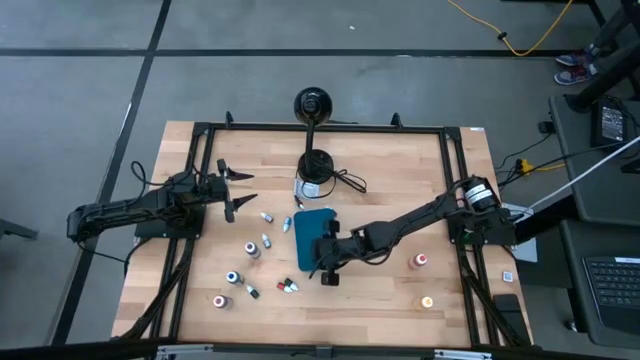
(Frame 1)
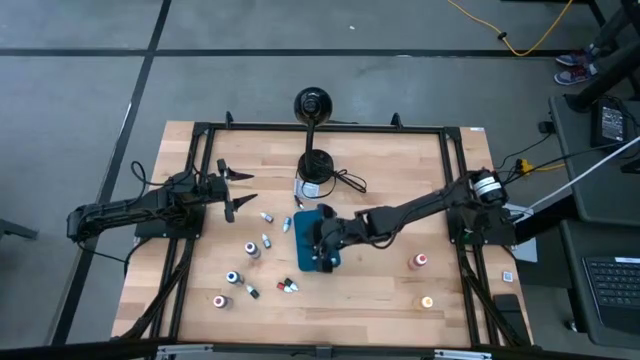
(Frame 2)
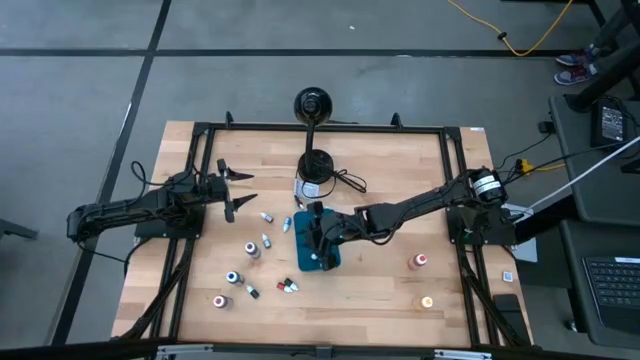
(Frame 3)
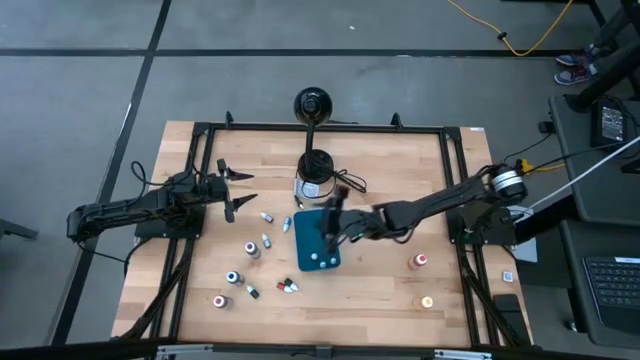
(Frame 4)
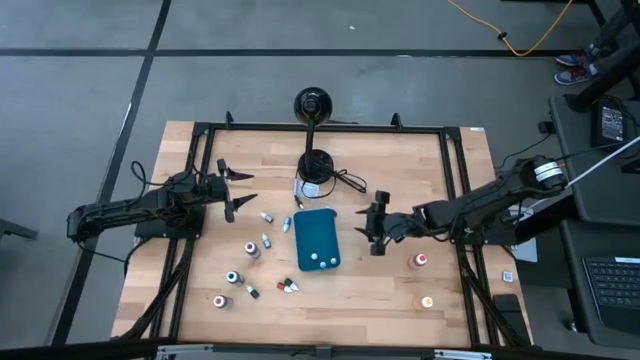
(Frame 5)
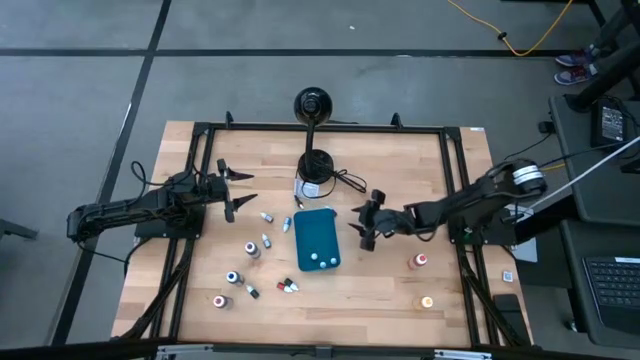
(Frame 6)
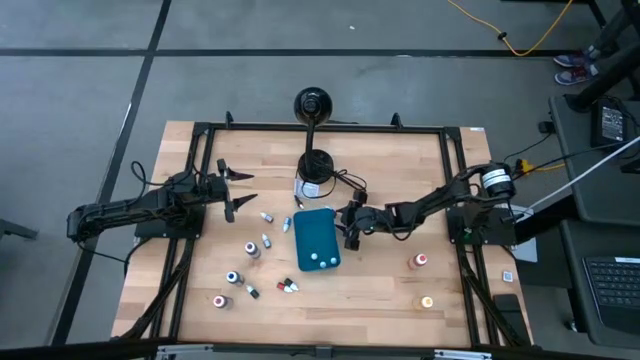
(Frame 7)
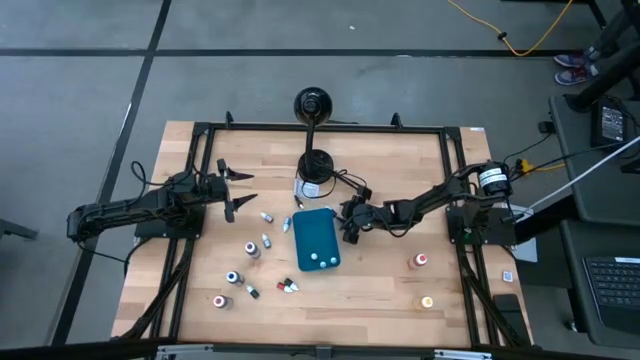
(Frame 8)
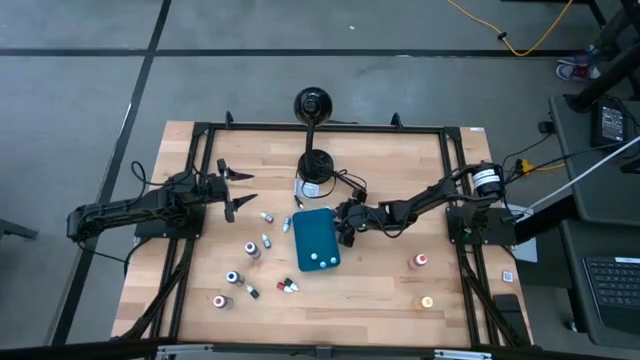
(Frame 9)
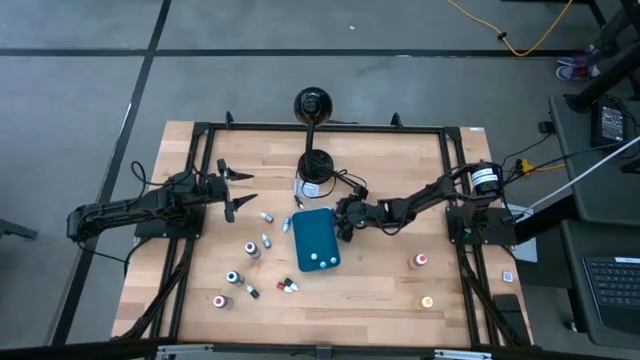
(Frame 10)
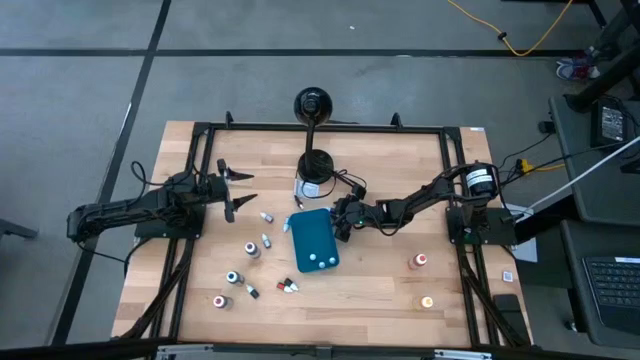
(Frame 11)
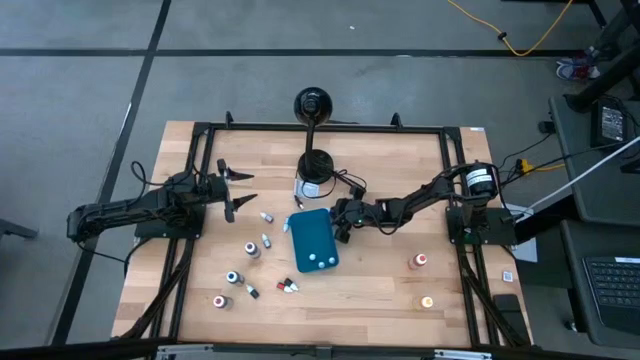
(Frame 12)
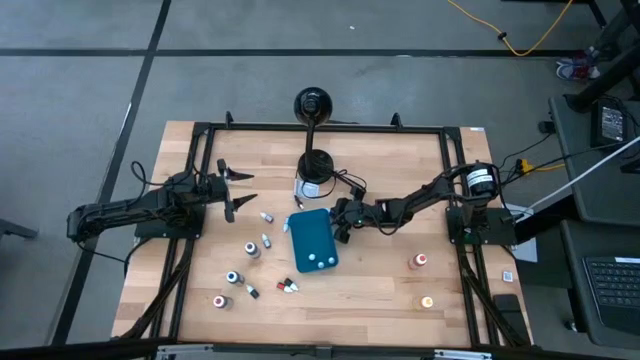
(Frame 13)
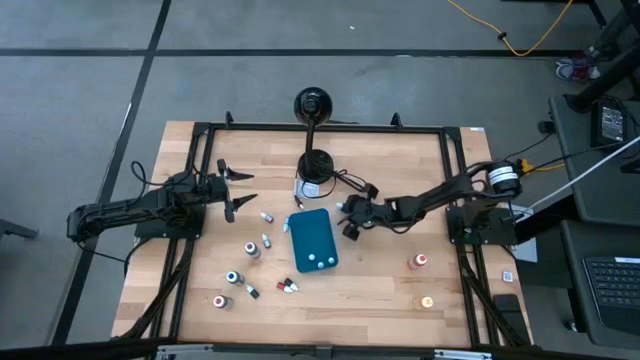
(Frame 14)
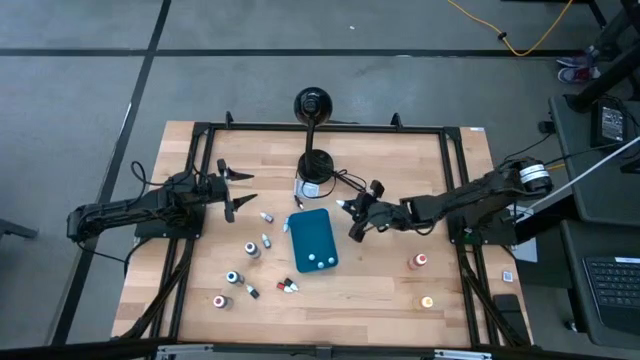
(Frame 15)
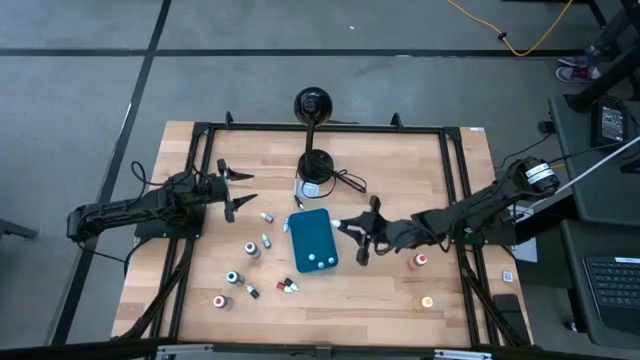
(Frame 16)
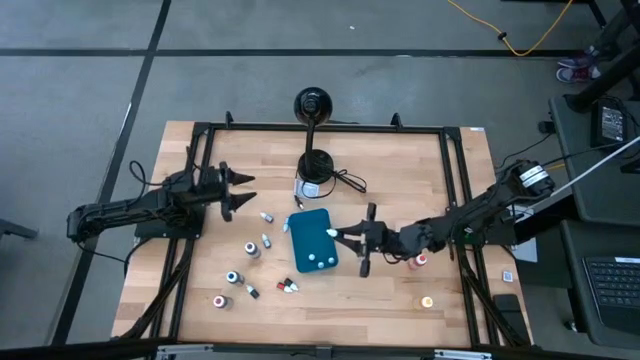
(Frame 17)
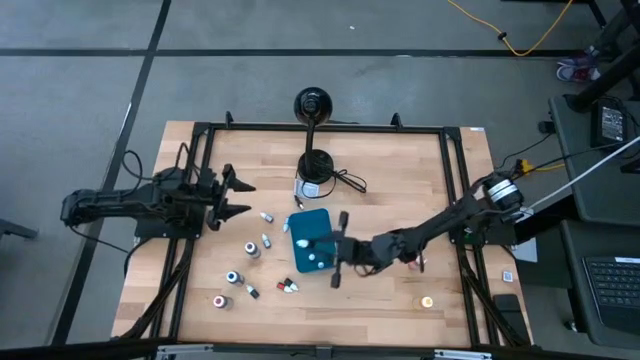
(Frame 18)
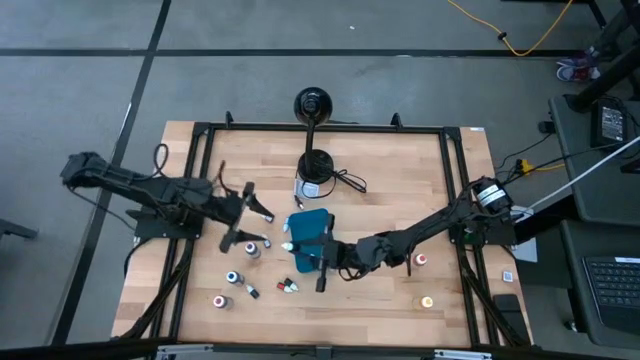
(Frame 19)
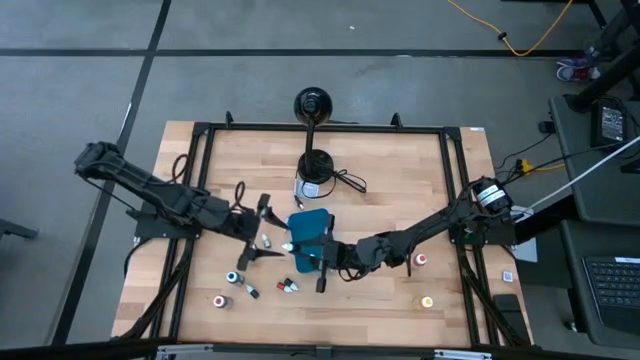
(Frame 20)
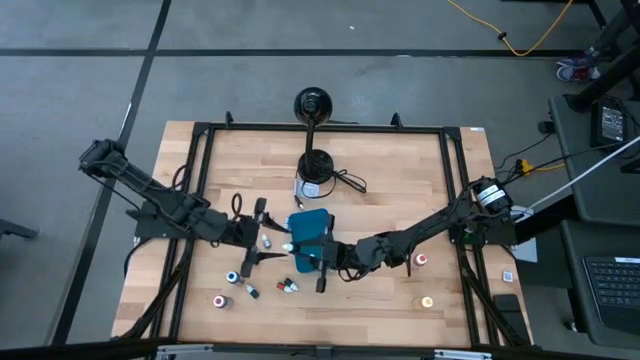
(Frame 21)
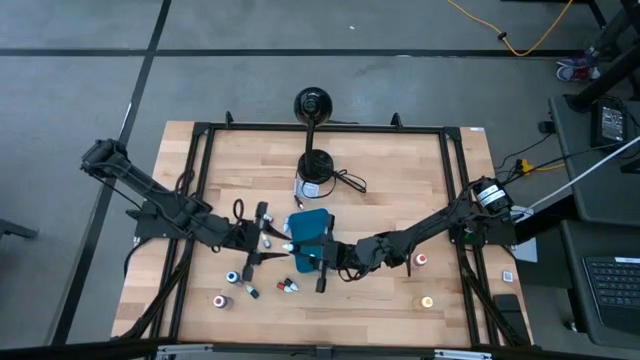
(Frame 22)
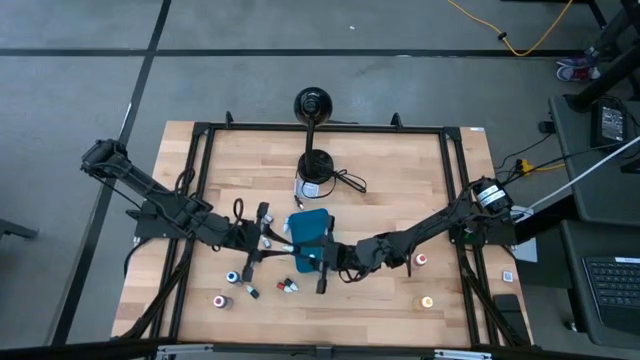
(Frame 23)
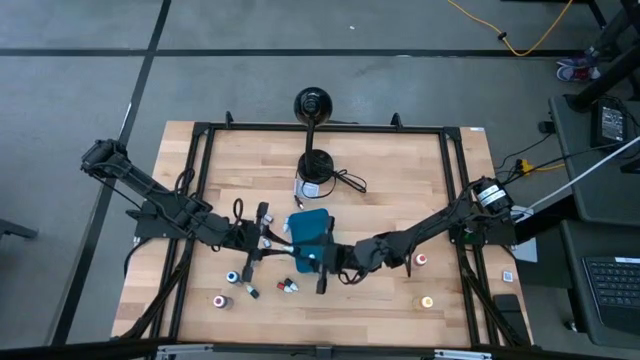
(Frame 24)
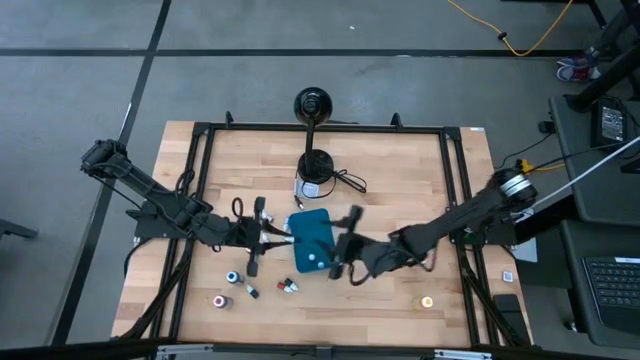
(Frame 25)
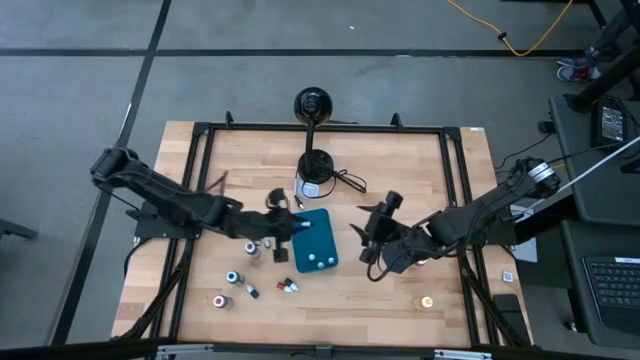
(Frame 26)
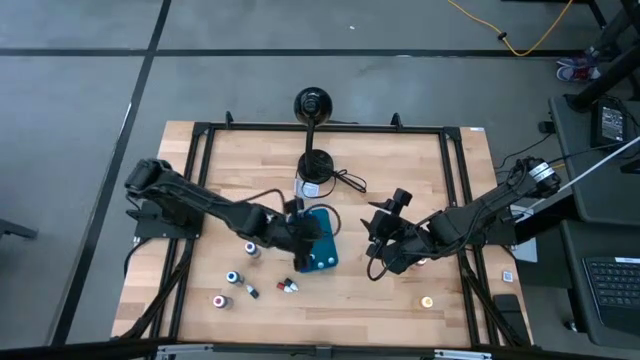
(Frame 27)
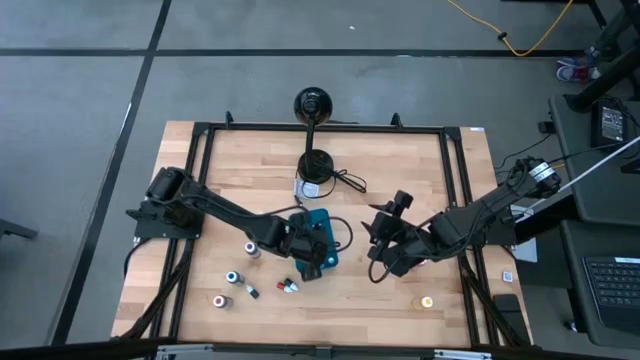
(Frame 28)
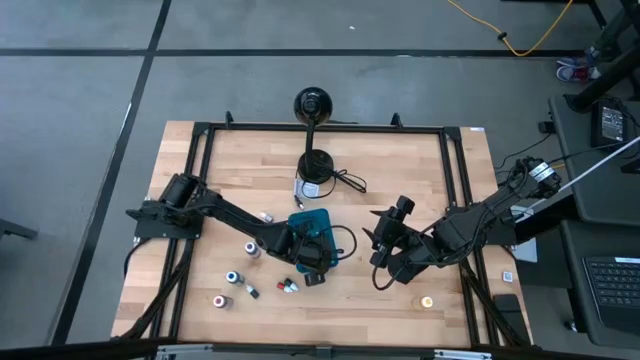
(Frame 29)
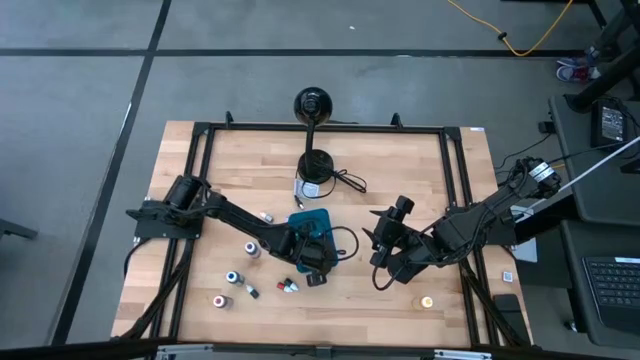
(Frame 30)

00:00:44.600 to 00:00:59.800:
Task: Pick & Place food coloring
Put the right blue small food coloring bottle into the bin

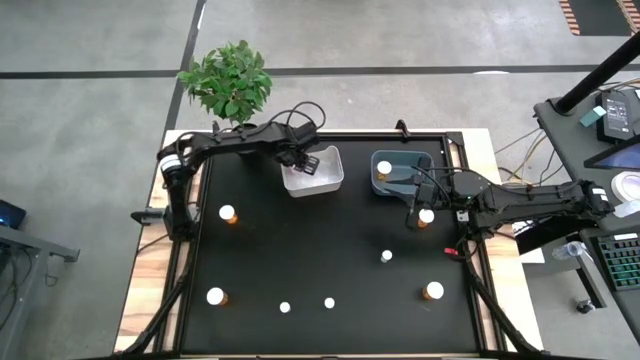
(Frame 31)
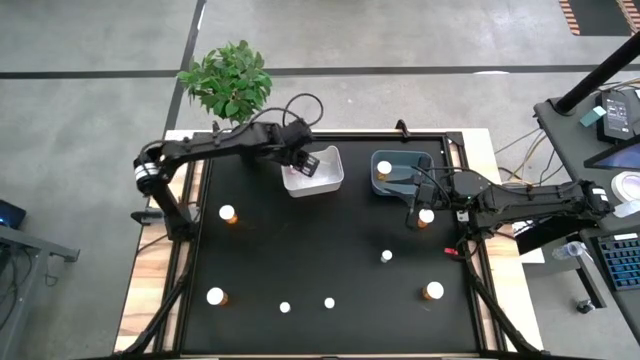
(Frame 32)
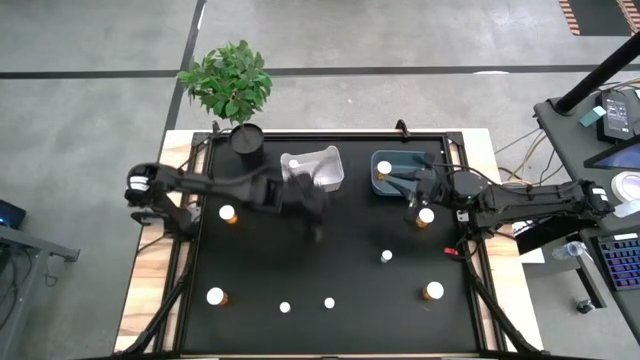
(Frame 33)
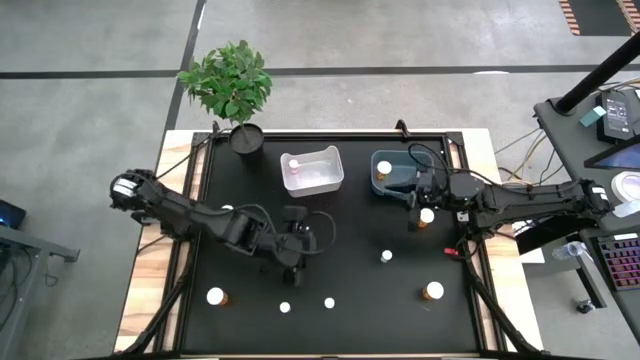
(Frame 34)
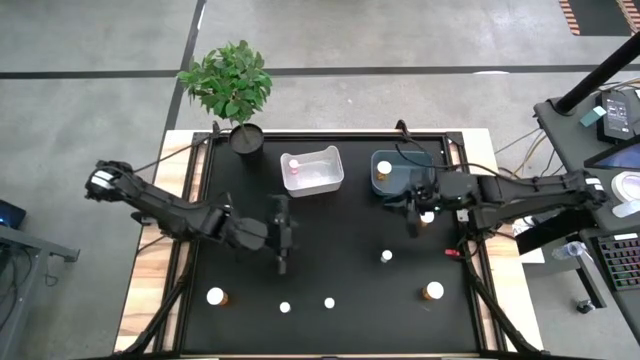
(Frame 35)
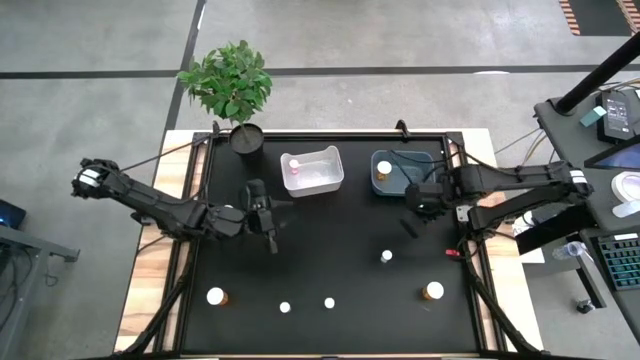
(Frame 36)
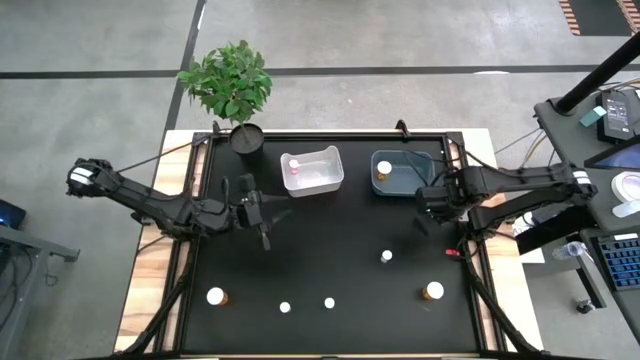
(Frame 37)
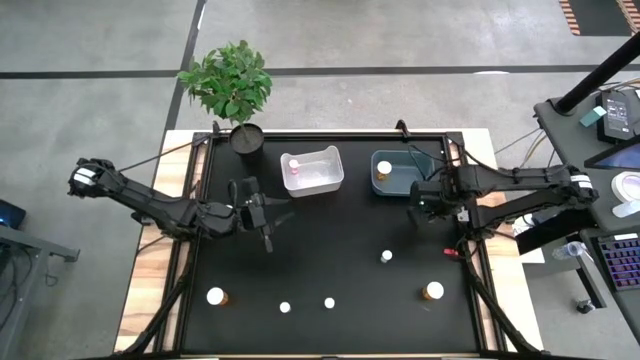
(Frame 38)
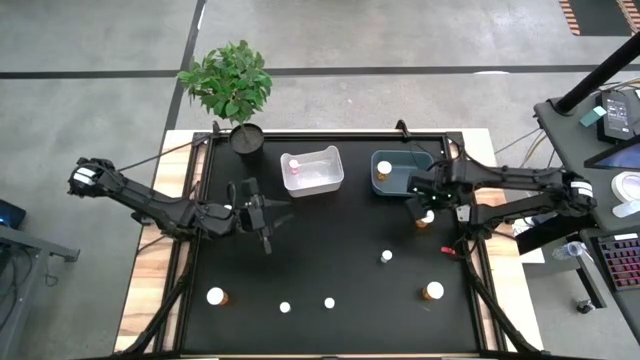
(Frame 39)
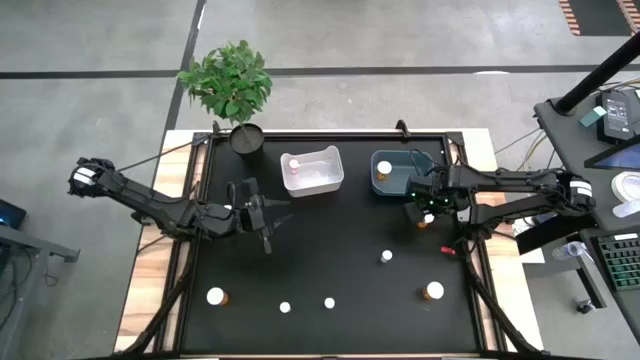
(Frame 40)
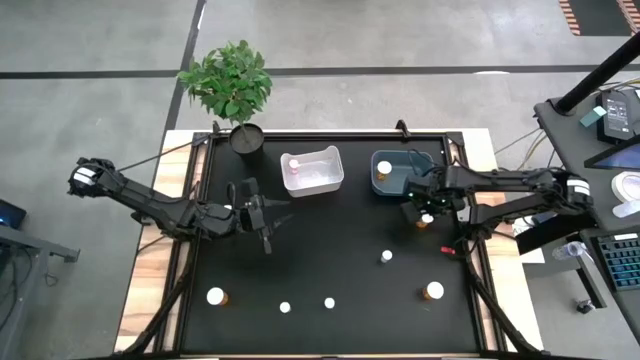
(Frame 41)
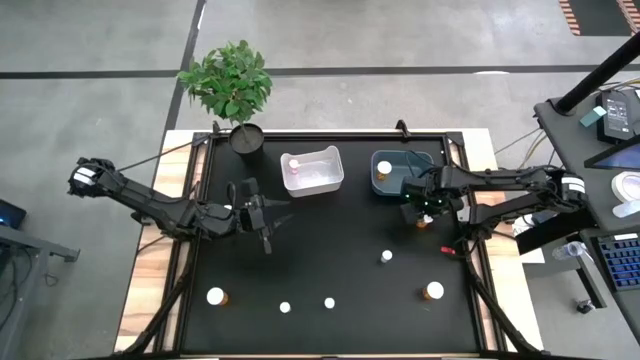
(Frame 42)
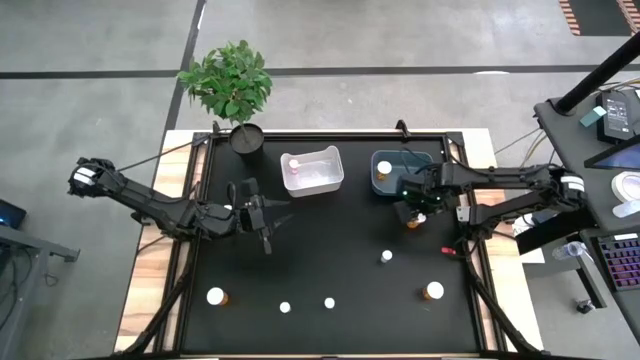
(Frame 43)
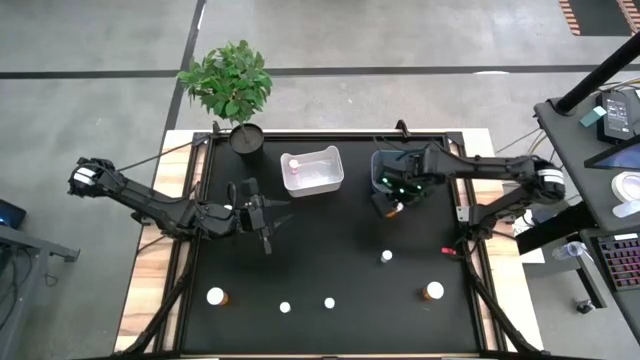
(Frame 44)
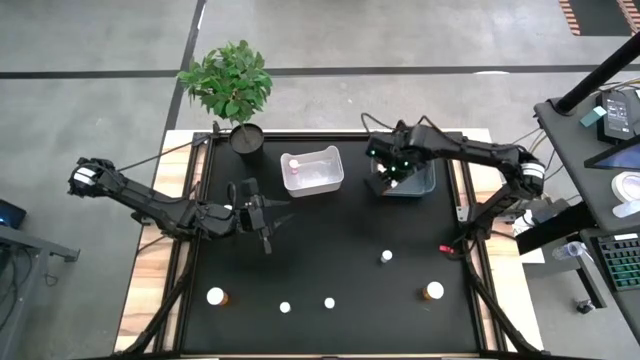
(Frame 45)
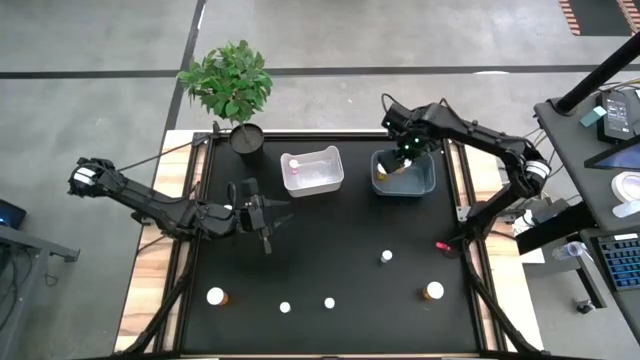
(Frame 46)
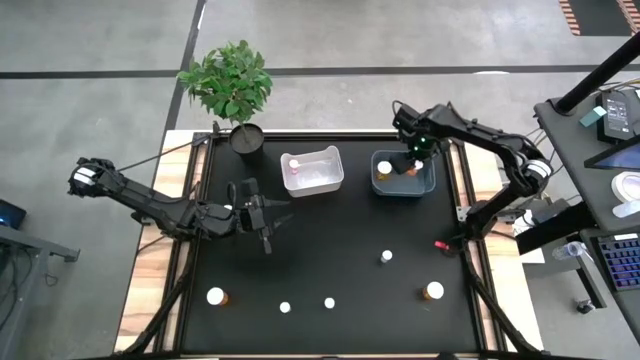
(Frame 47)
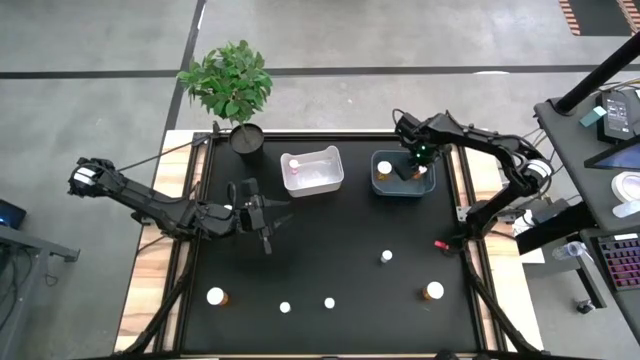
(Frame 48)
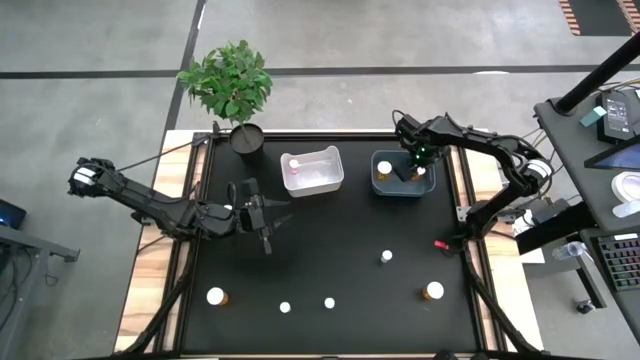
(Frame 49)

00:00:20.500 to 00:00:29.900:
Task: Pick and place medicine bottles into bin by pill shape (circle, oval)
Put the orange capsule bottle into the blue bin
